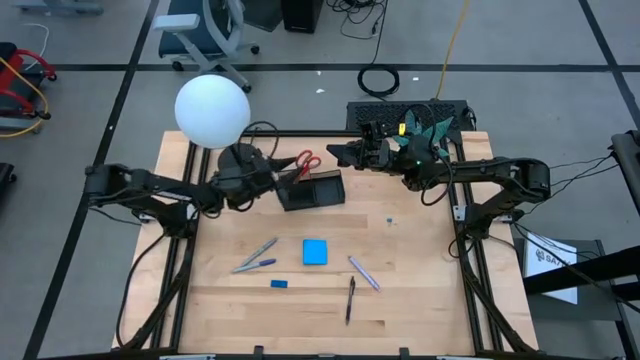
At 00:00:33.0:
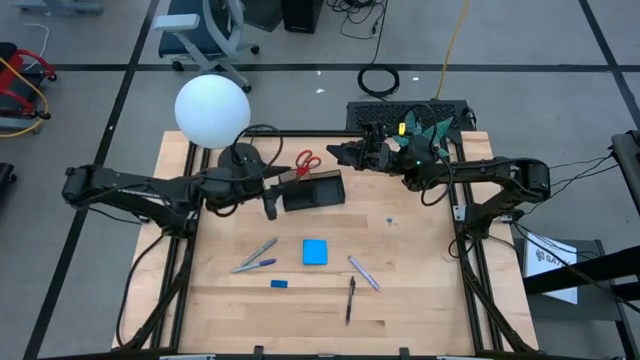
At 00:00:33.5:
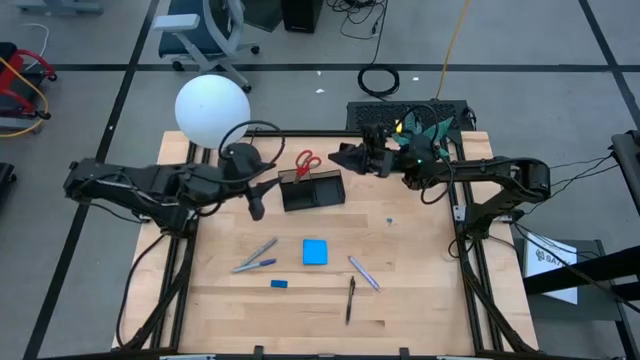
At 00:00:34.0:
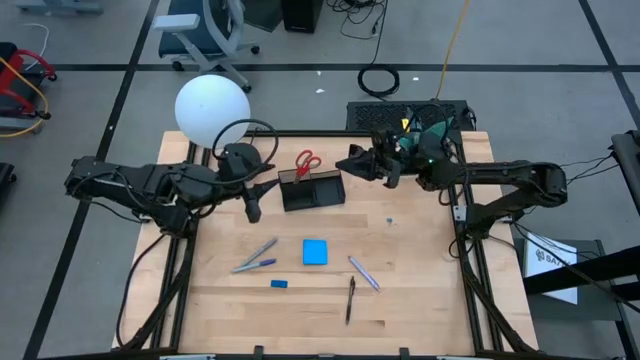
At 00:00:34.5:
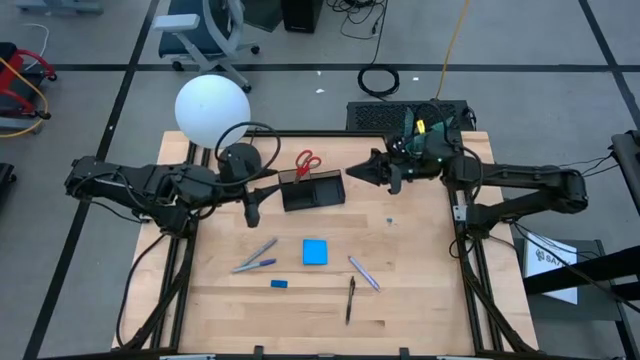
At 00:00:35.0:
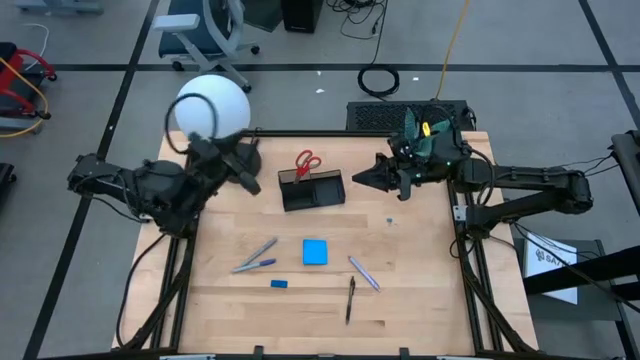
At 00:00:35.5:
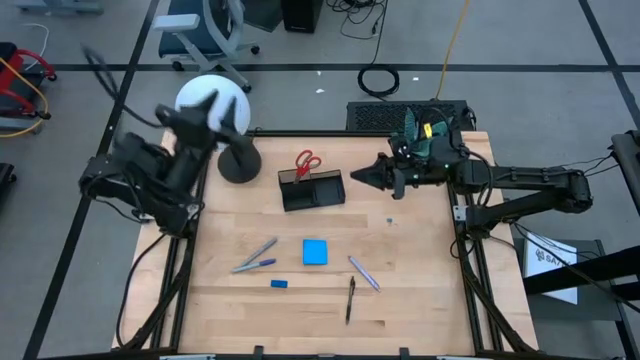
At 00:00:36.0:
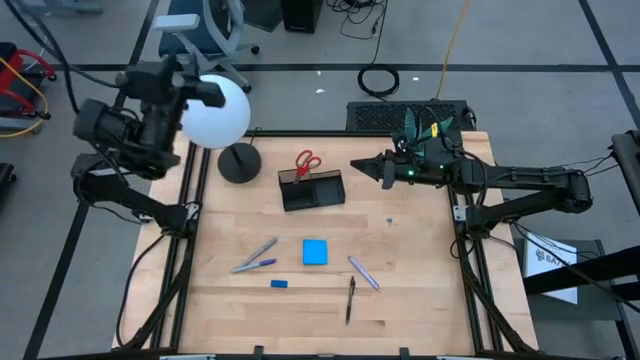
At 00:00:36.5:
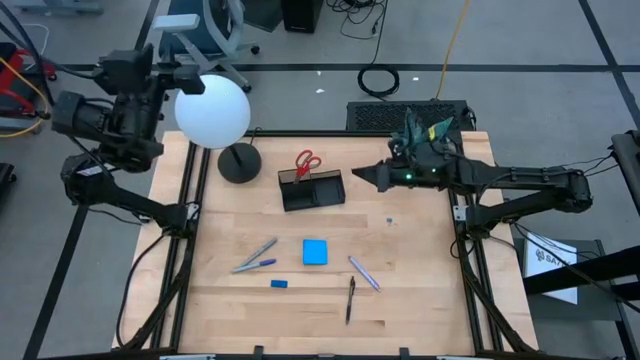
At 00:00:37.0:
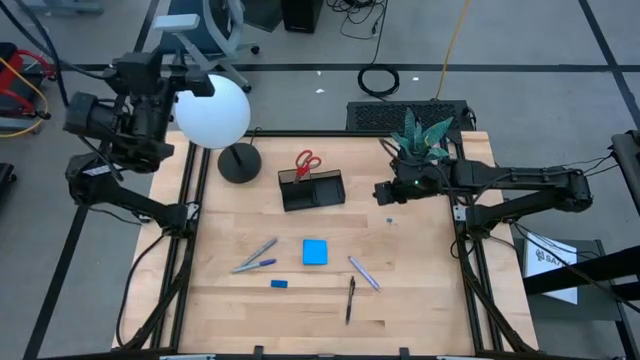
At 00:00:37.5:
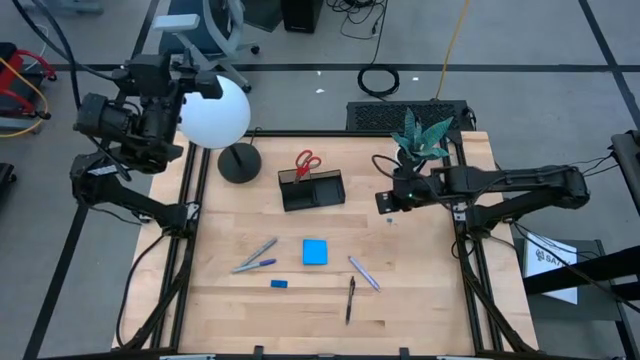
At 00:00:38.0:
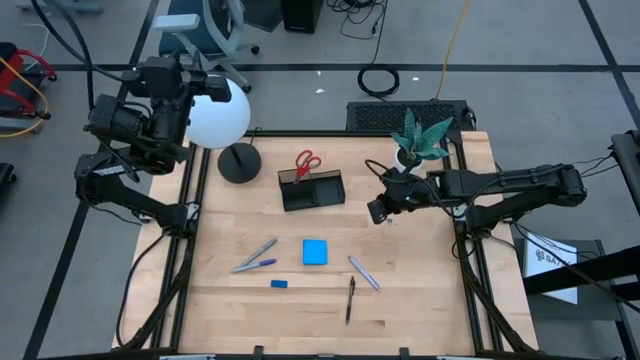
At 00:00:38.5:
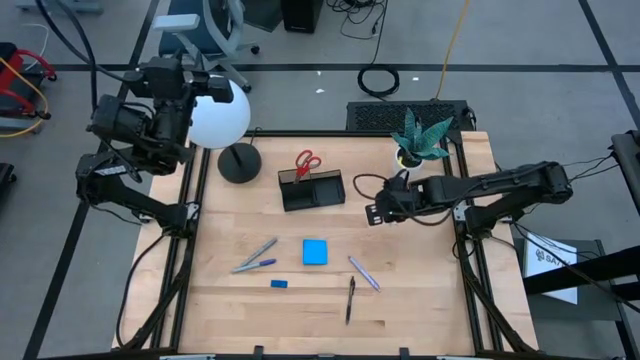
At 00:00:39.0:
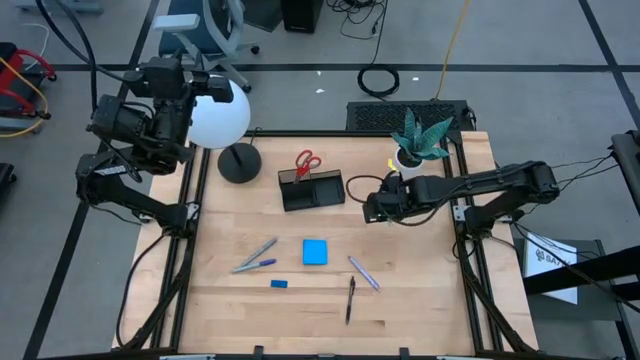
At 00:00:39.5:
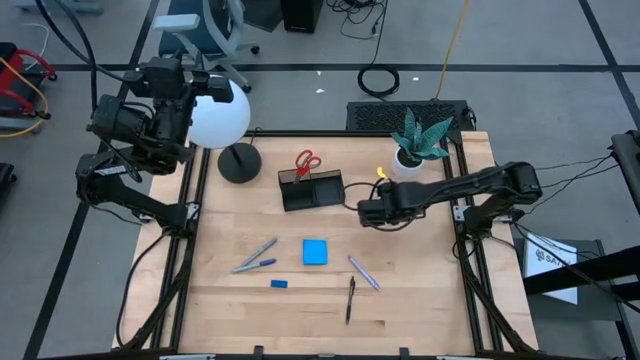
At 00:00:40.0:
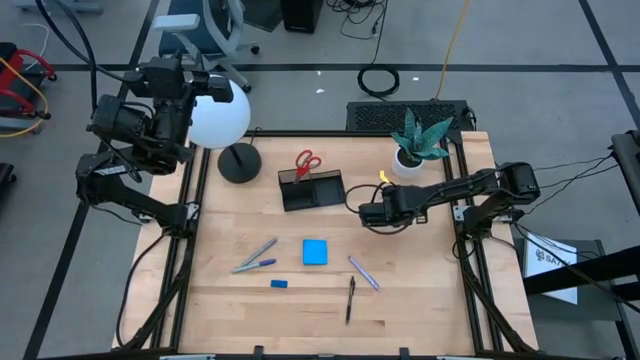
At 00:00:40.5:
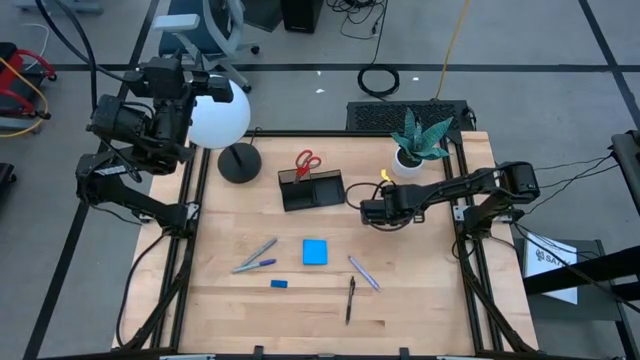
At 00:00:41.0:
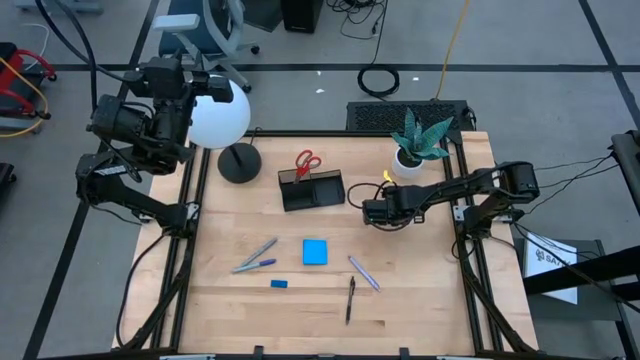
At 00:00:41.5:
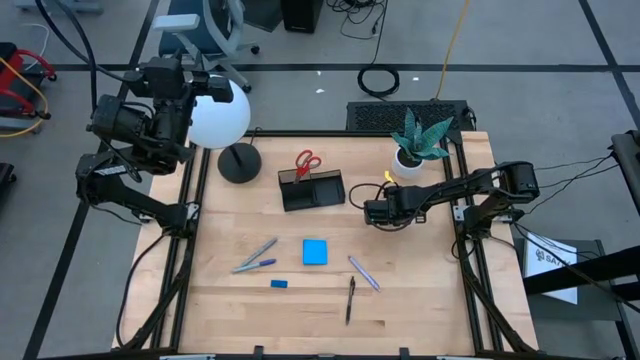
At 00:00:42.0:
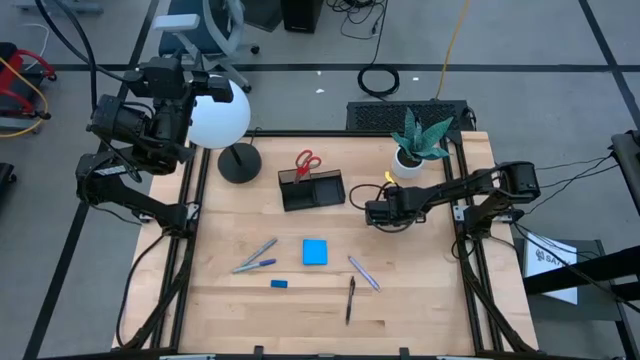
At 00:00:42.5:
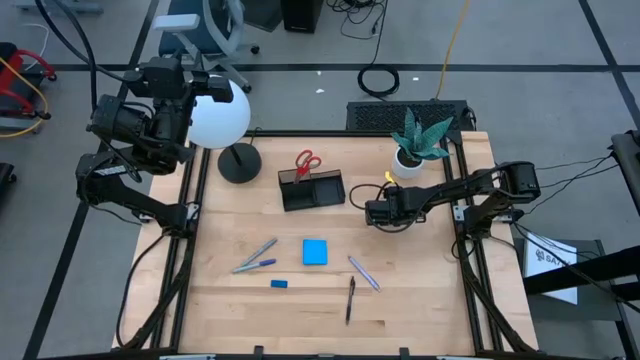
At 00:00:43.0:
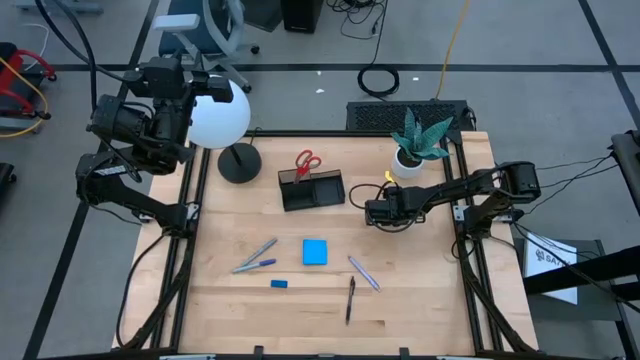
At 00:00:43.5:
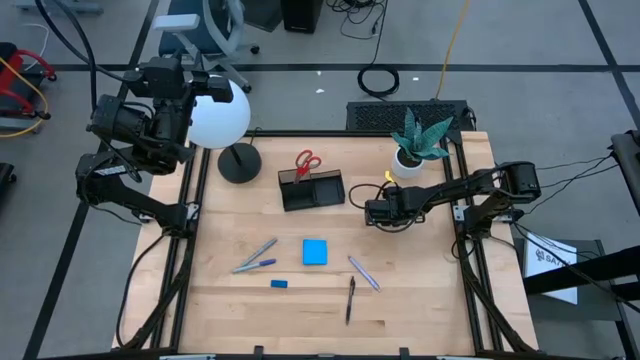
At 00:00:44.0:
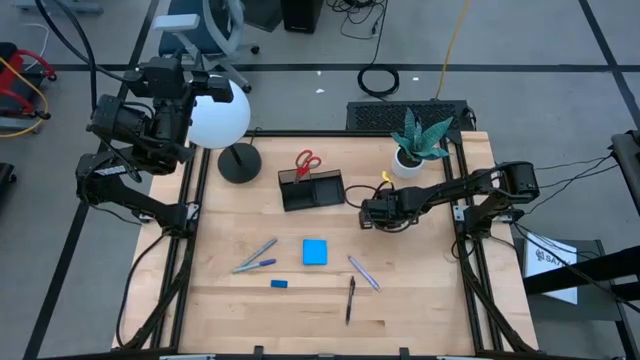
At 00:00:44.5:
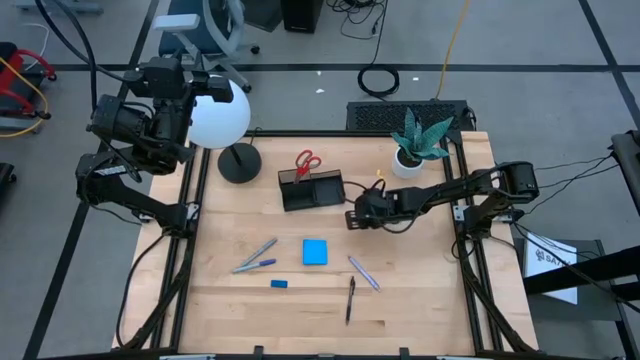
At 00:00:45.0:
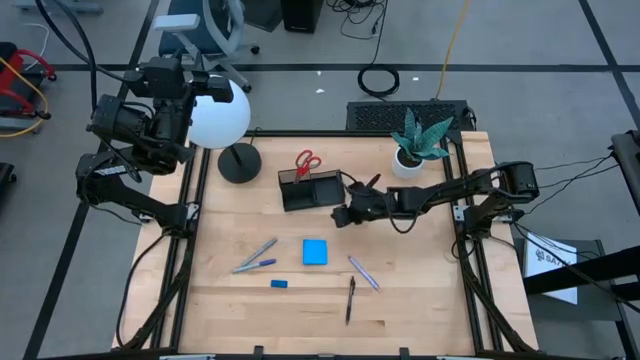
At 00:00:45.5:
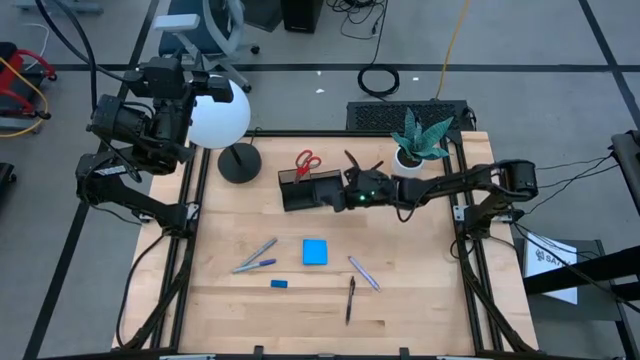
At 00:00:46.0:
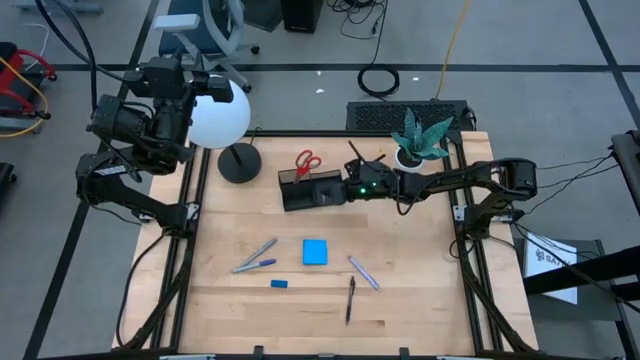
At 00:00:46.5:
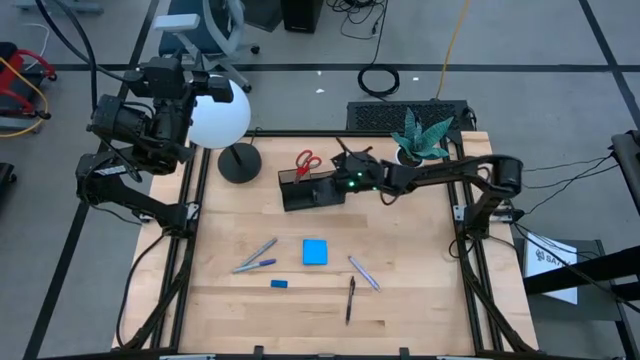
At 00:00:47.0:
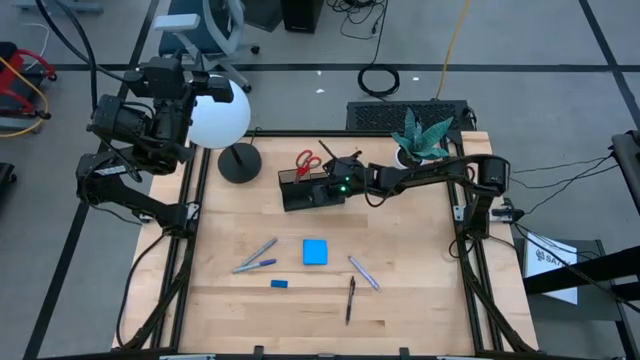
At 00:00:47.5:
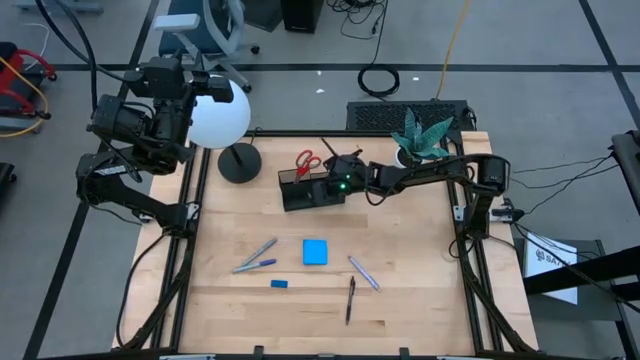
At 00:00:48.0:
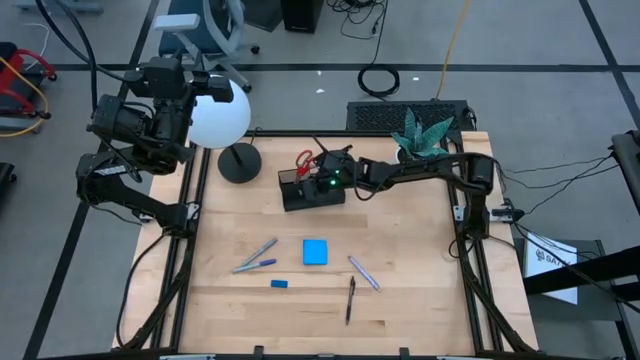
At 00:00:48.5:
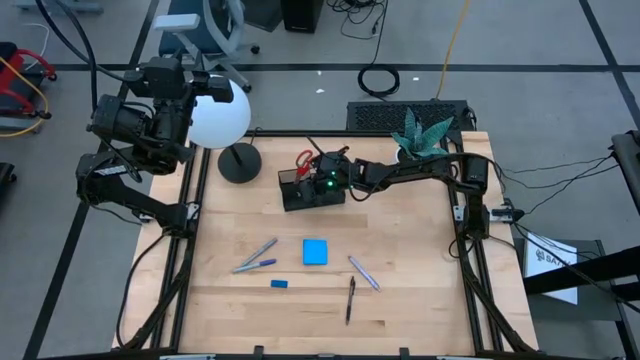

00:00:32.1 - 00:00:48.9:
Task: Pick and place office supplies into organizer
Put the binder clip into the desk organizer

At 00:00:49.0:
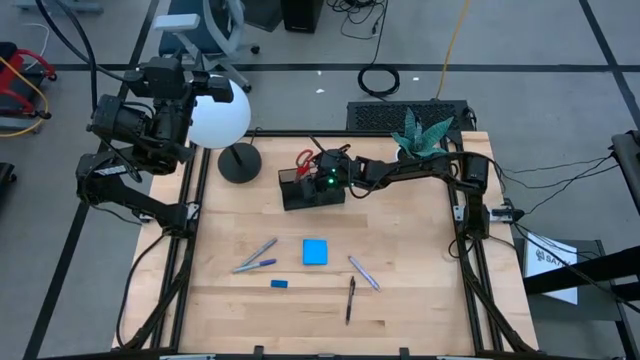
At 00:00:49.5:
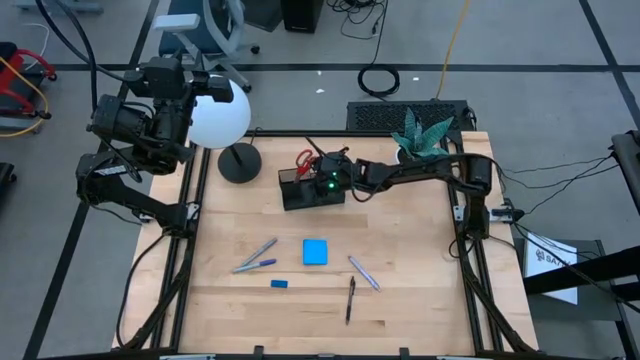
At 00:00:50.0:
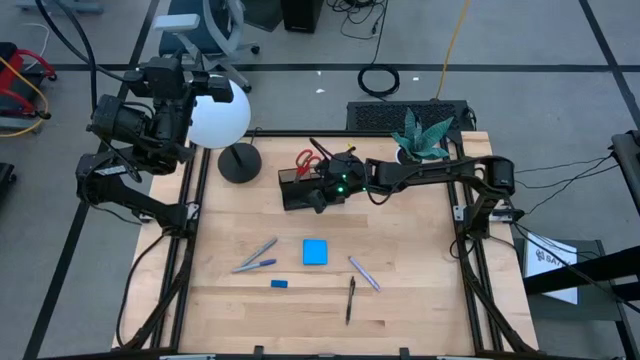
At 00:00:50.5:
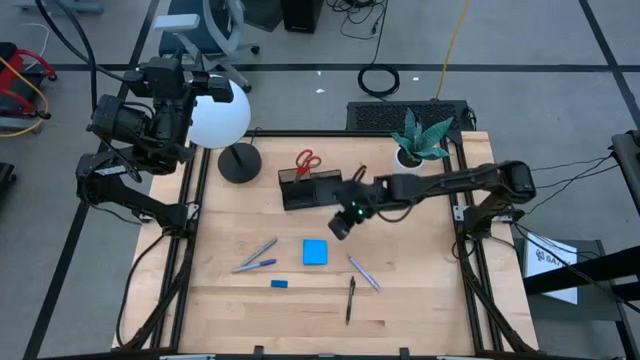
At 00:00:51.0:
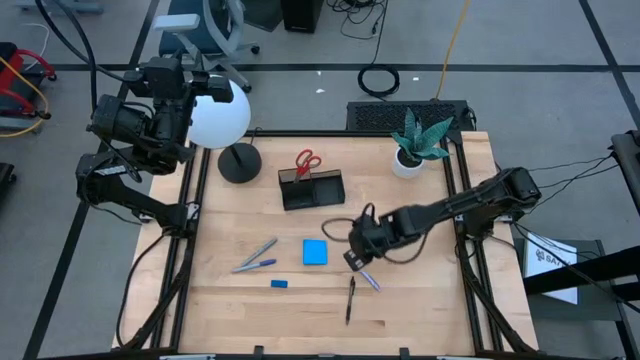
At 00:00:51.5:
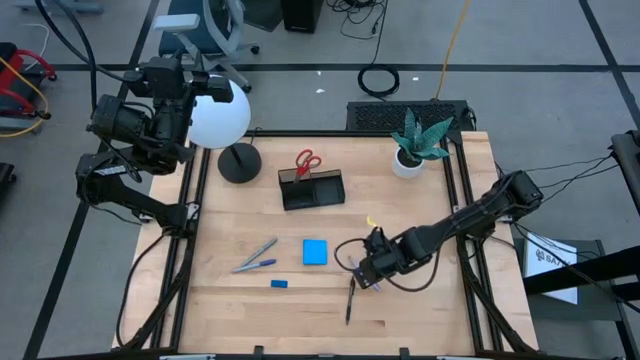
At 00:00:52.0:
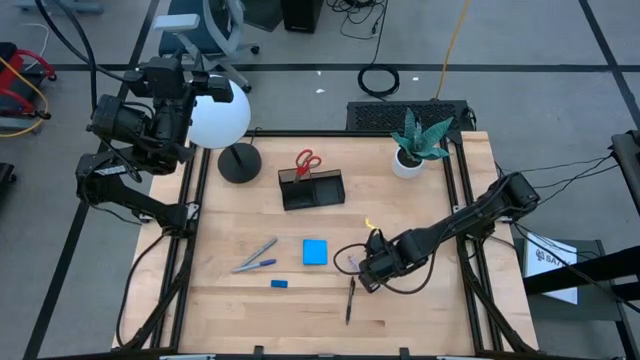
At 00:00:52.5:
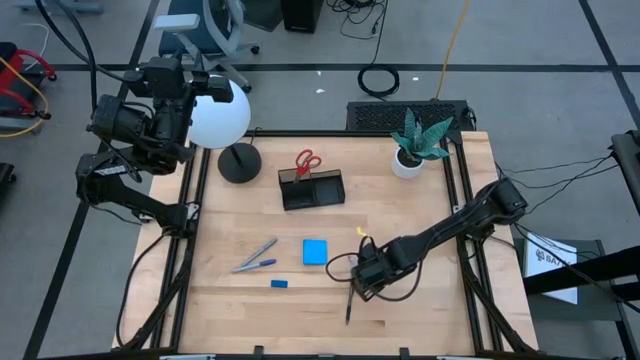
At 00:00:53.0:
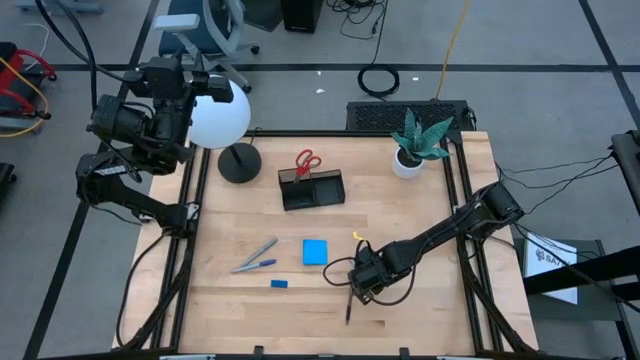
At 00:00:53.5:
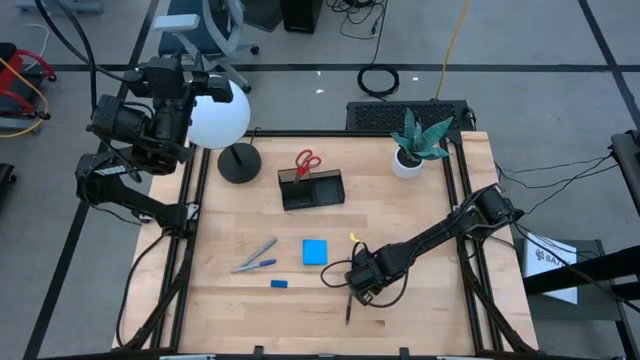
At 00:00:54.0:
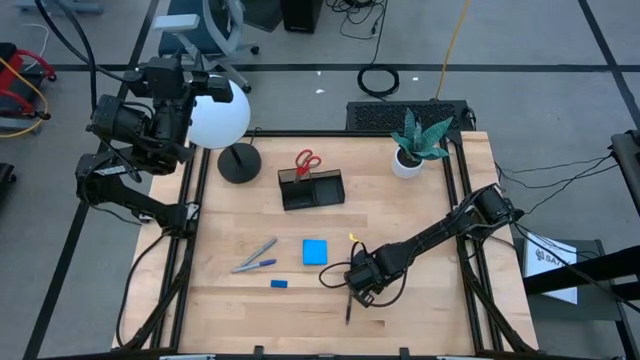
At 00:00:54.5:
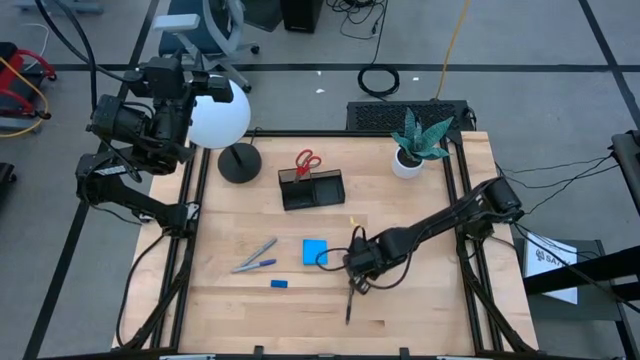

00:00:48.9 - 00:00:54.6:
Put the violet pen into the desk organizer
